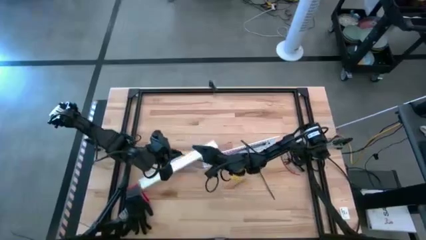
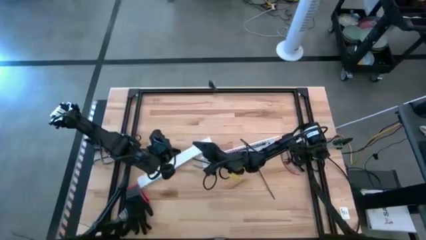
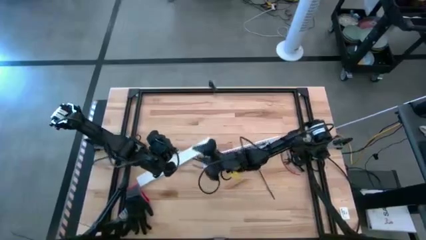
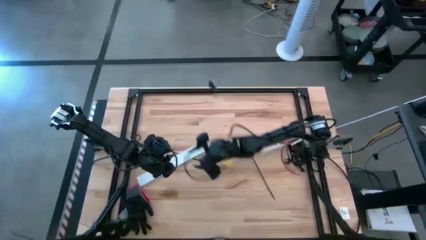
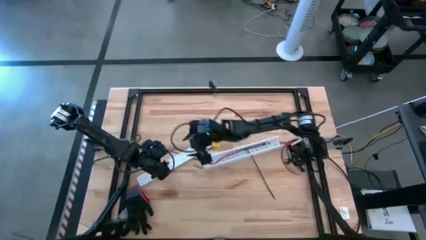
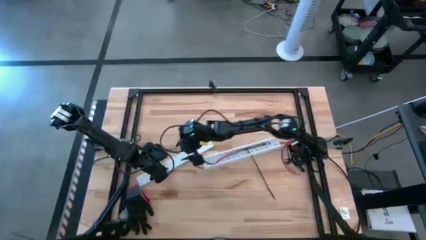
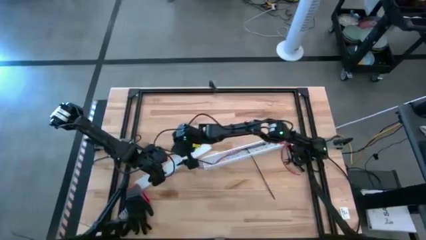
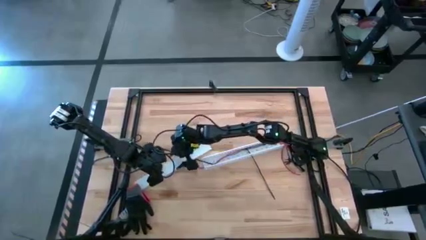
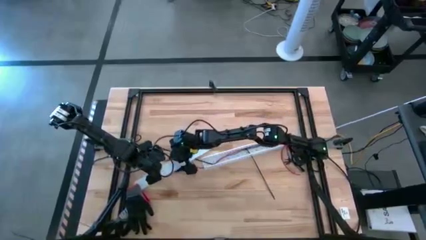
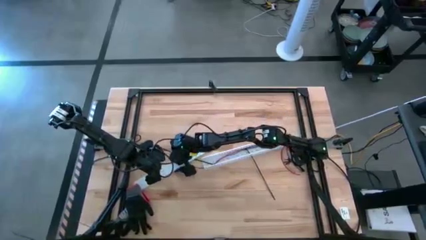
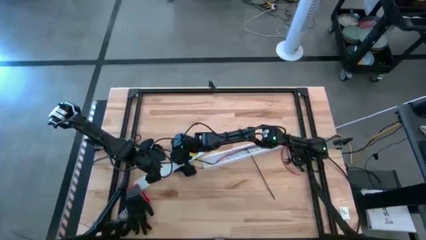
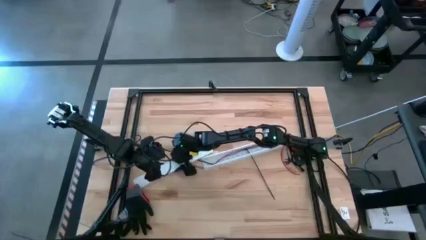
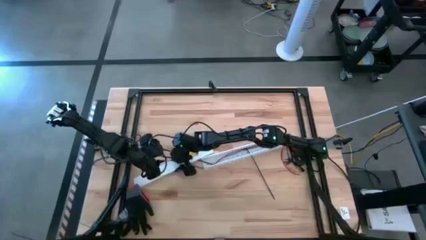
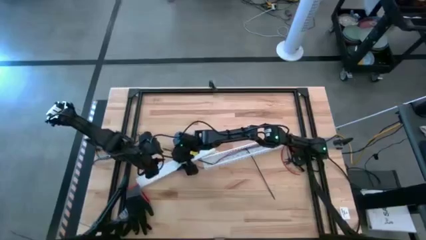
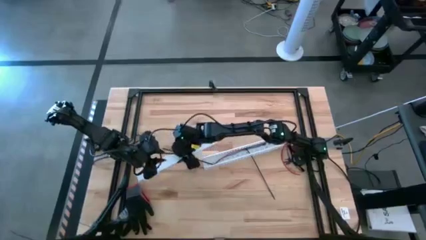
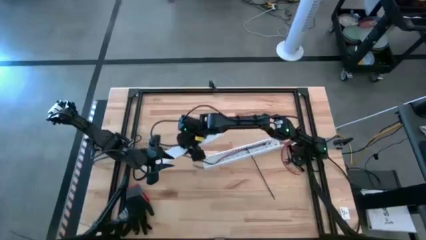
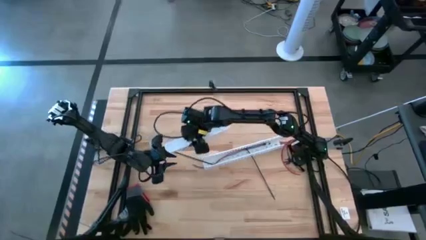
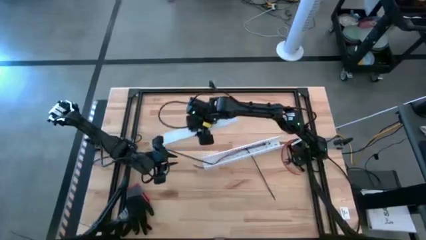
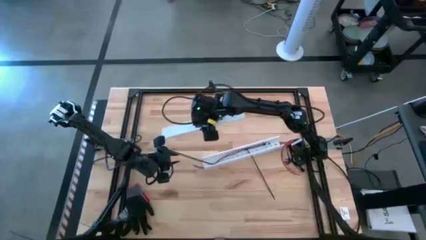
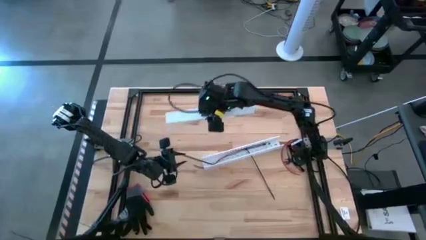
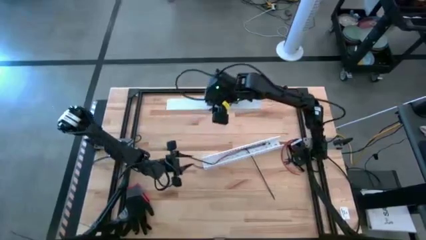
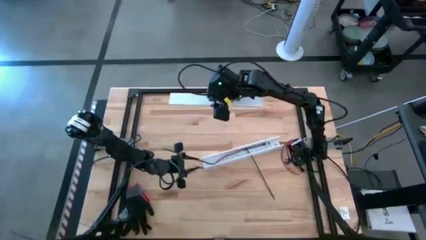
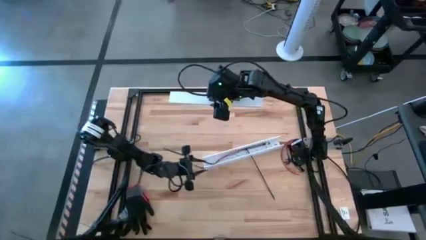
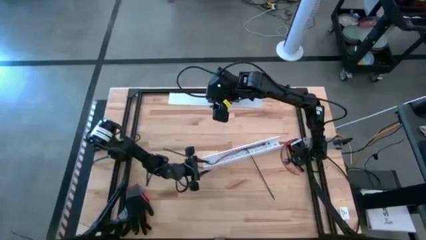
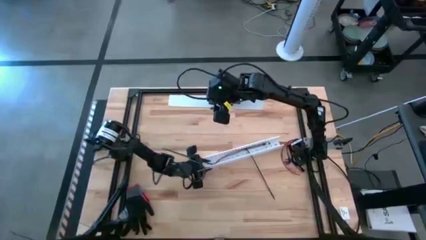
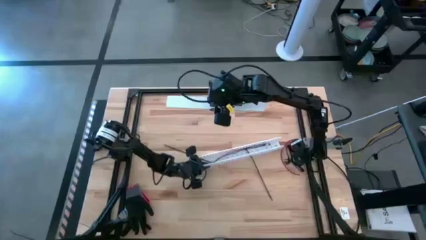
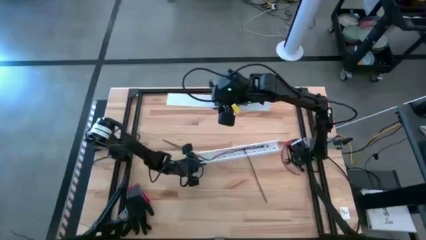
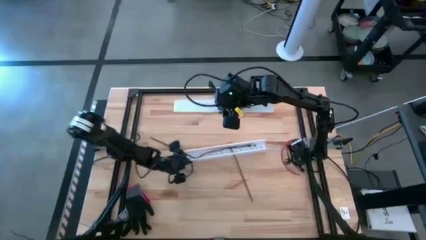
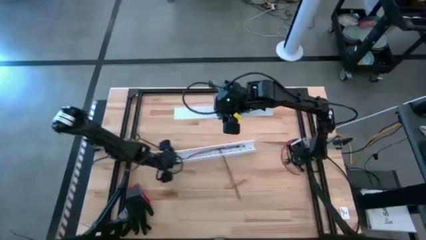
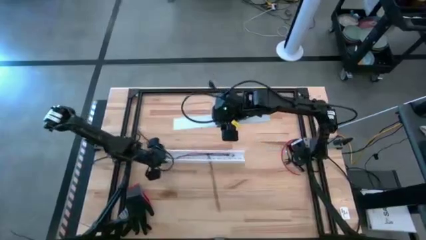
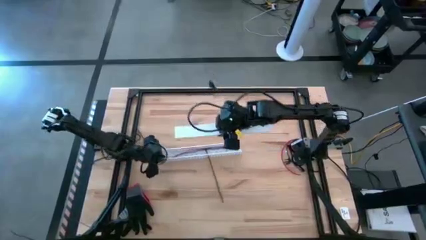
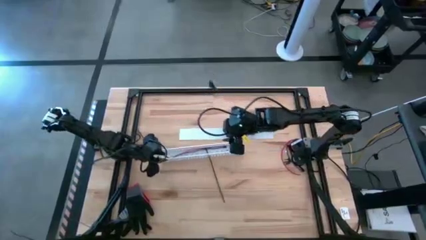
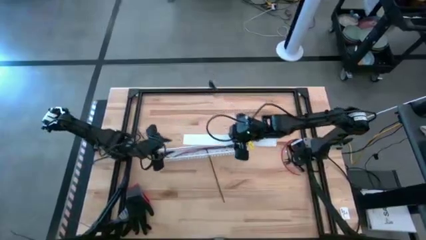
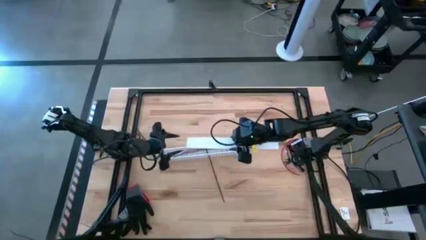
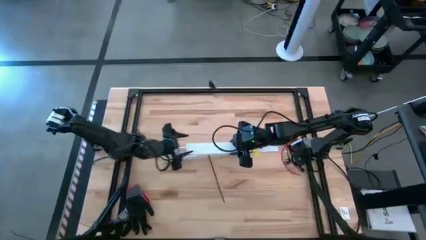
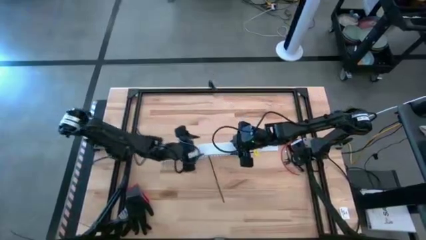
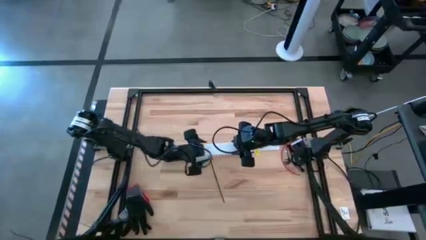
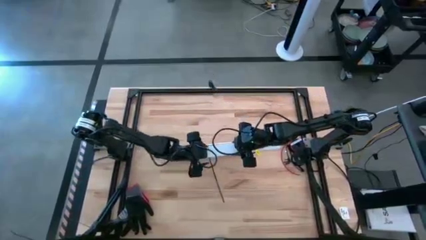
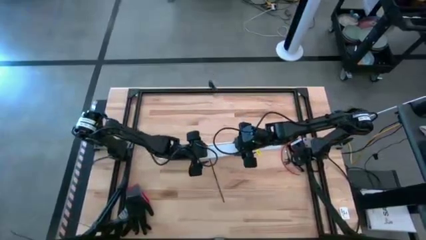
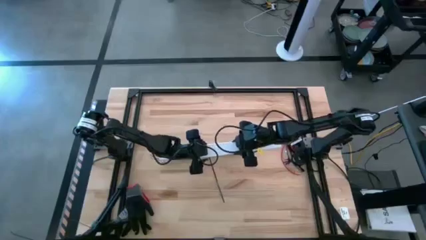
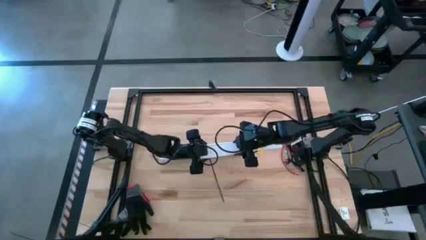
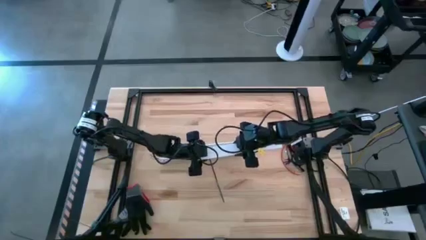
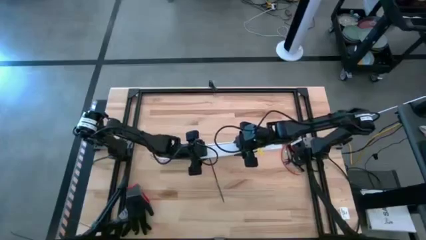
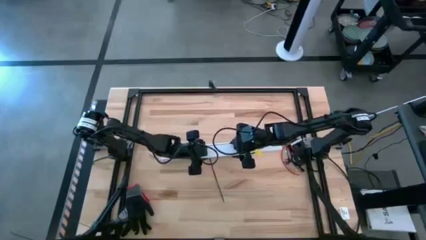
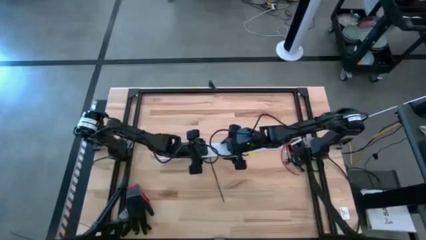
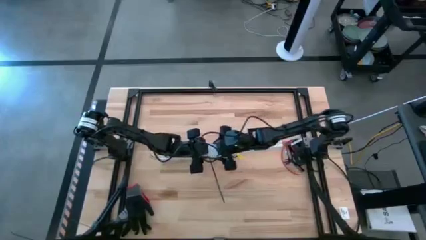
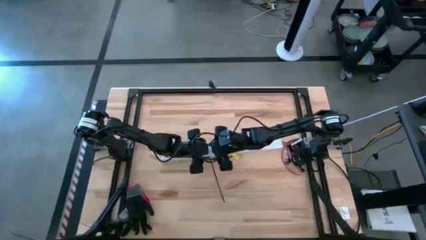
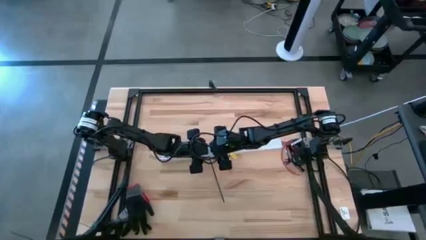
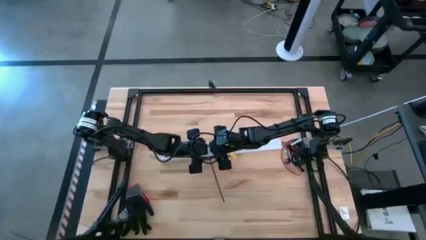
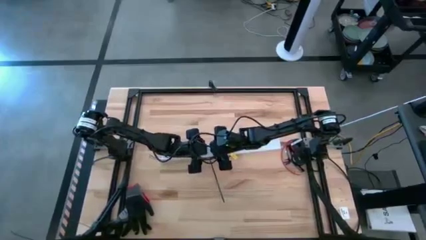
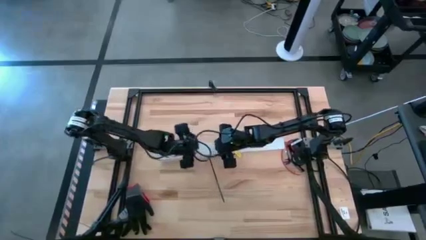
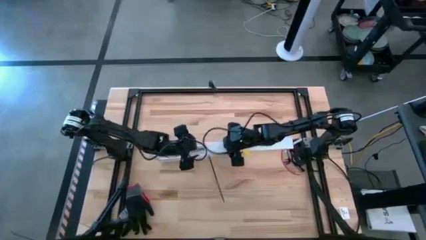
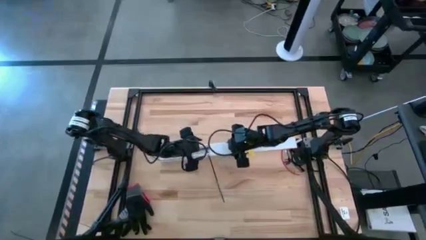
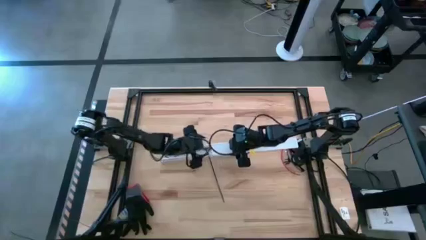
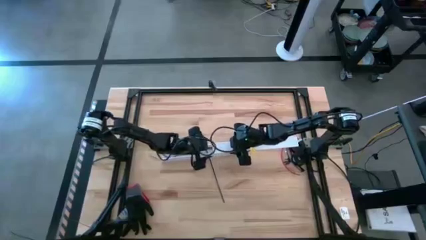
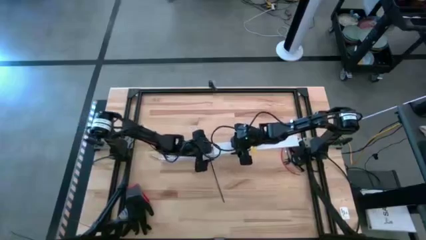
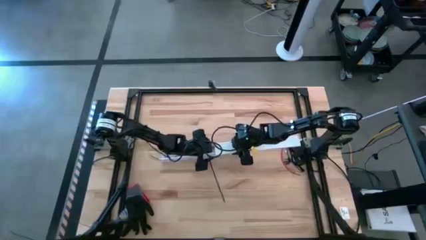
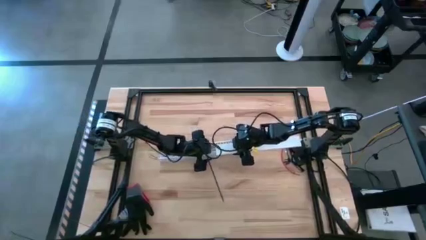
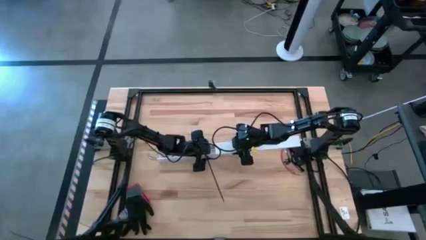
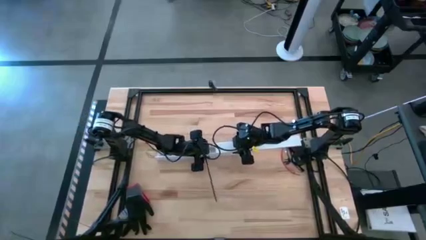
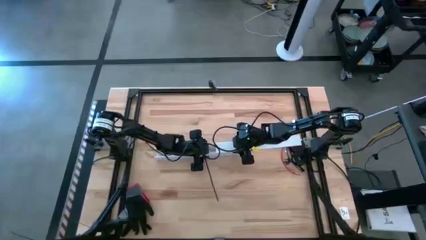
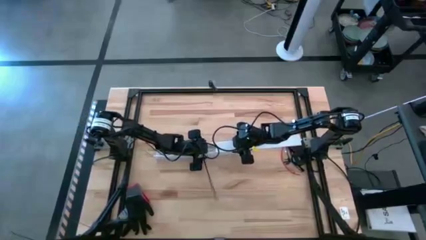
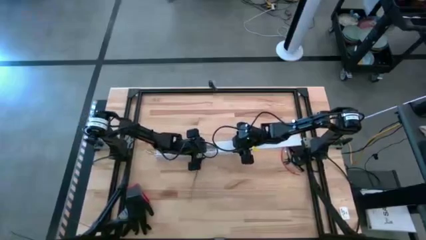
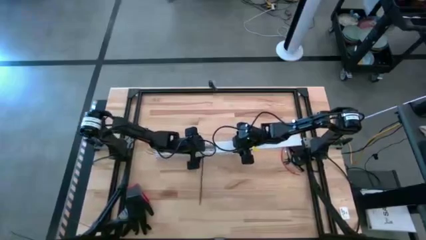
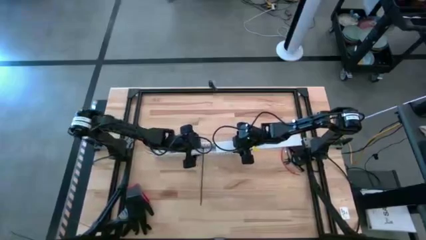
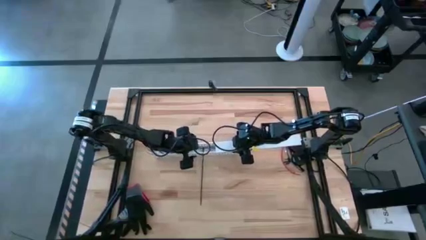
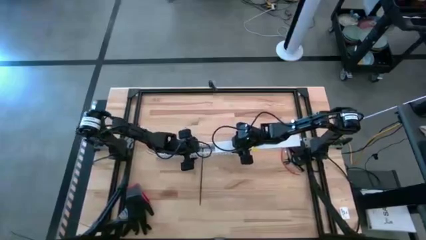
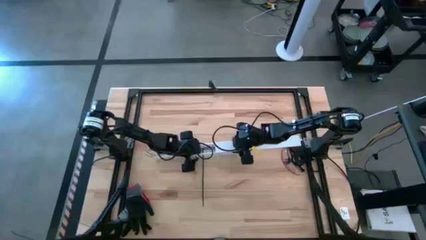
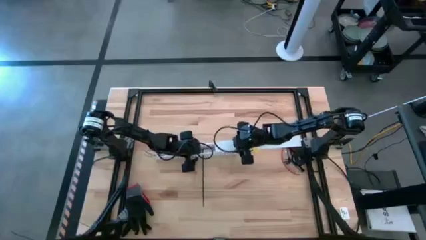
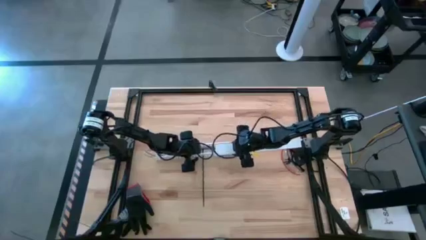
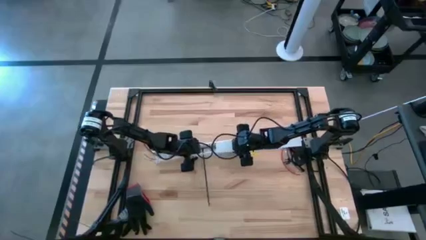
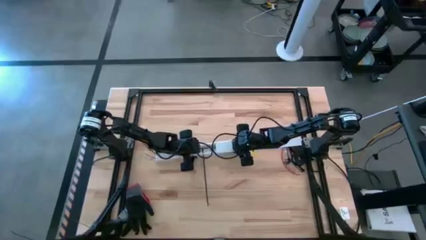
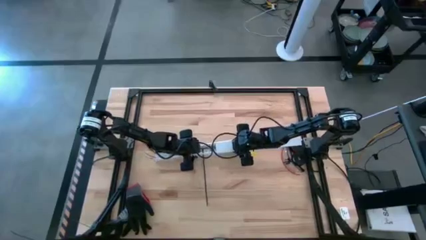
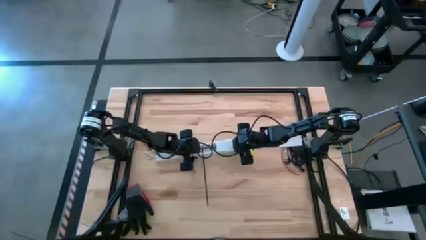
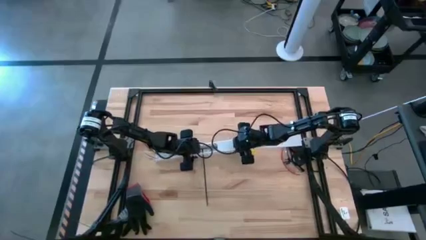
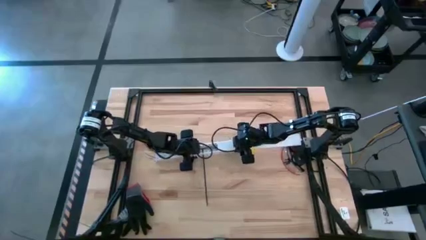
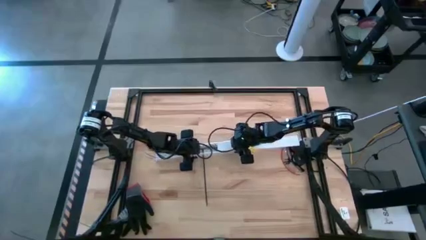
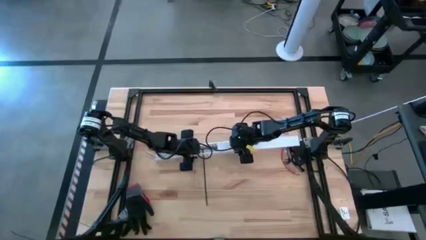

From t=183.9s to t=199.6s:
Task: Ziptie cables
Close the white cable duct

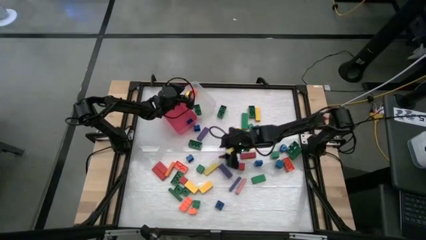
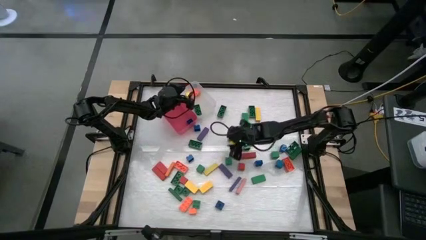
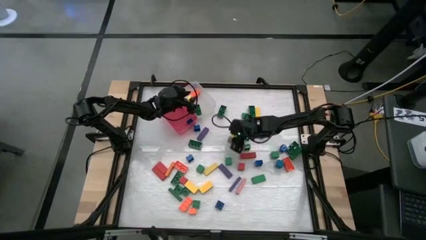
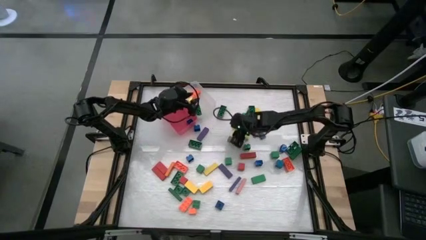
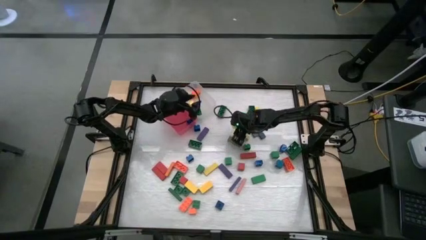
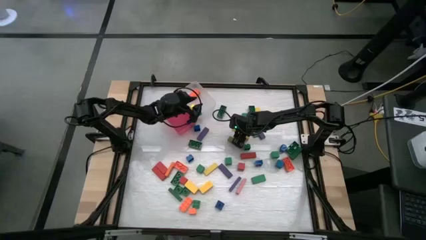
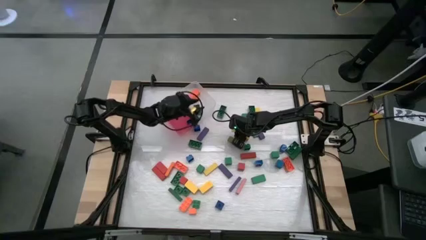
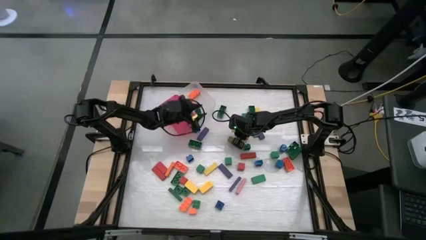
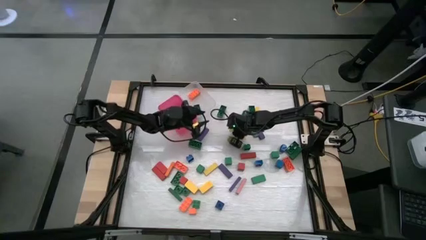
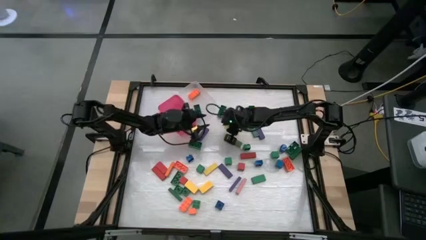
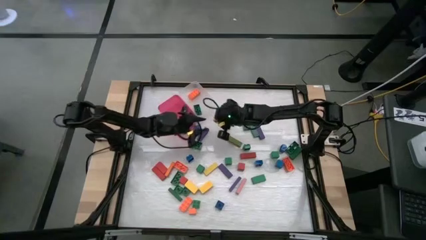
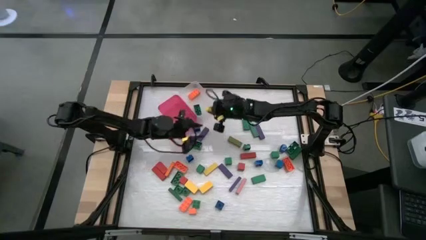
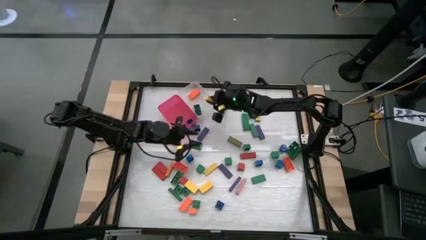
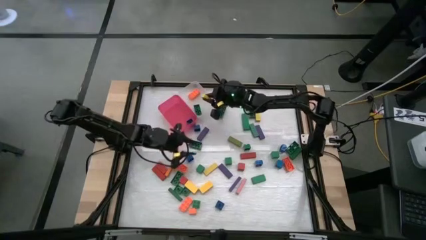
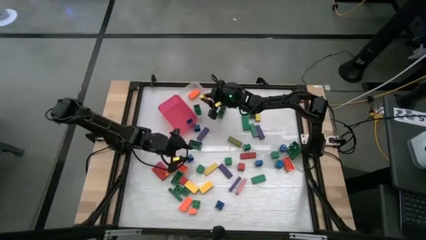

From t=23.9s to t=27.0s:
Task: Sort blocks by size
Put the big yellow block into the white bin
